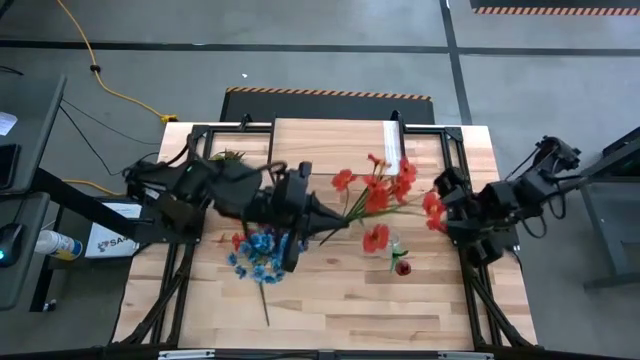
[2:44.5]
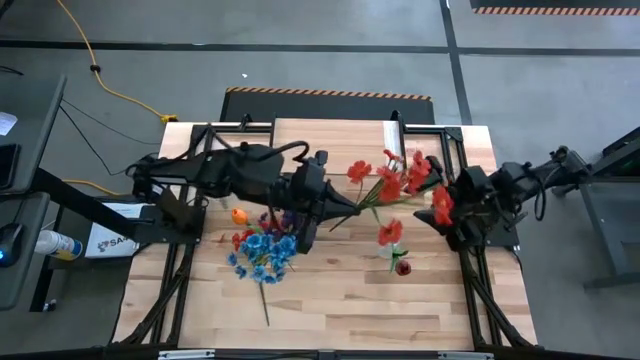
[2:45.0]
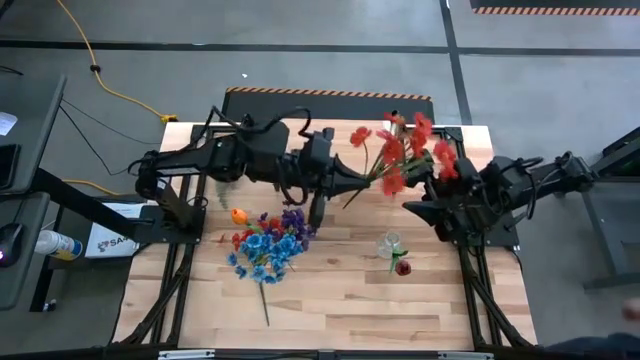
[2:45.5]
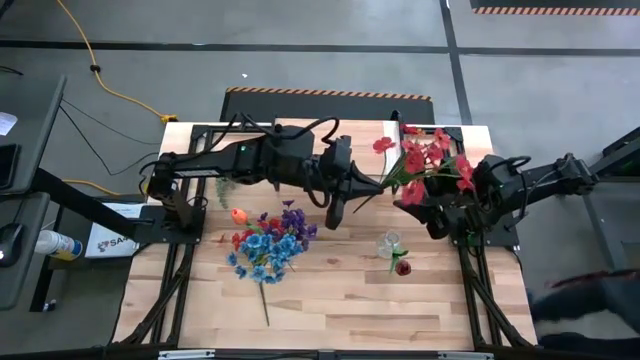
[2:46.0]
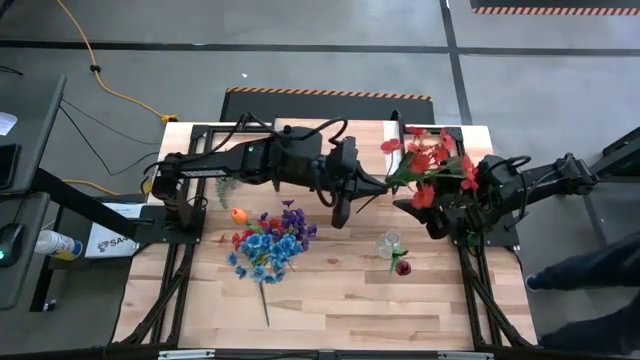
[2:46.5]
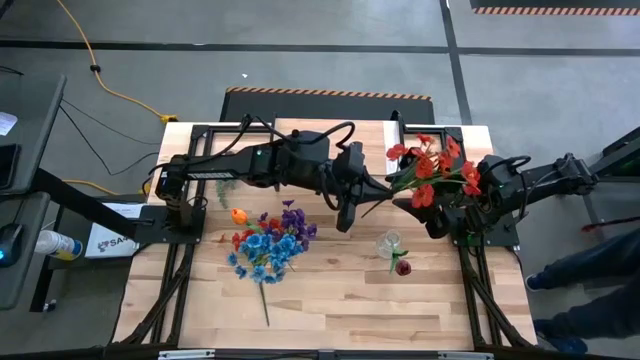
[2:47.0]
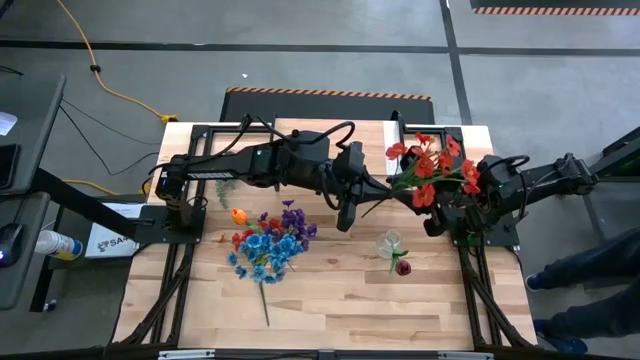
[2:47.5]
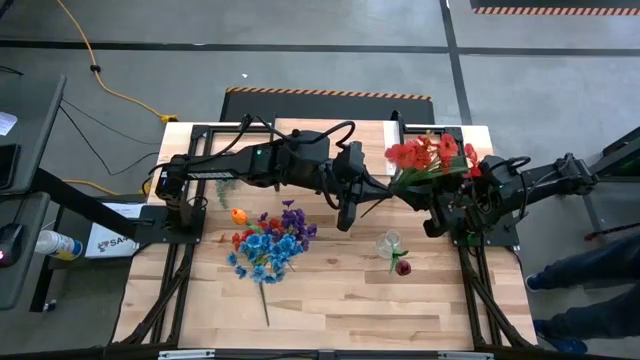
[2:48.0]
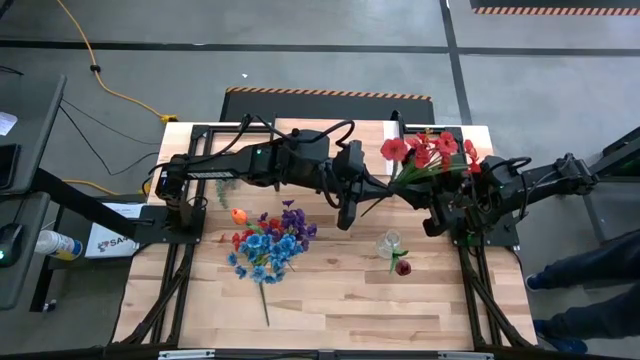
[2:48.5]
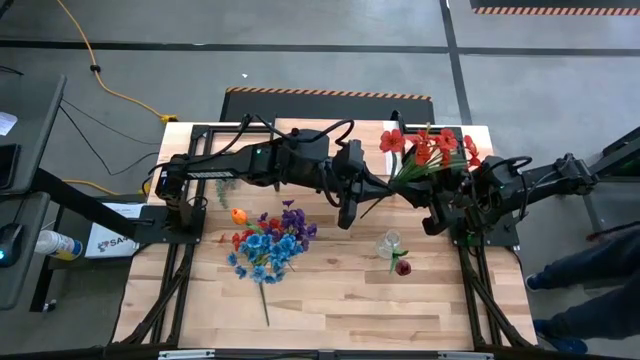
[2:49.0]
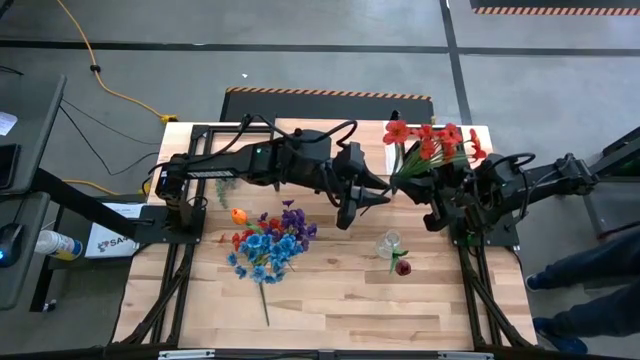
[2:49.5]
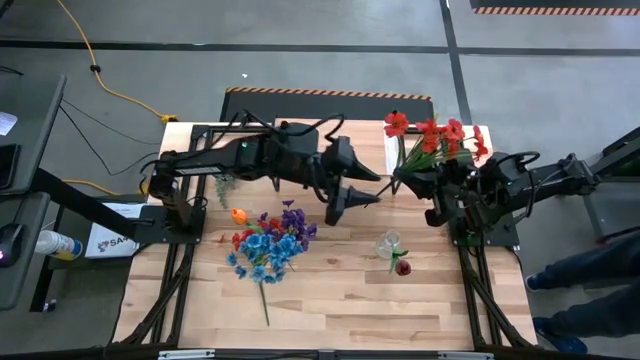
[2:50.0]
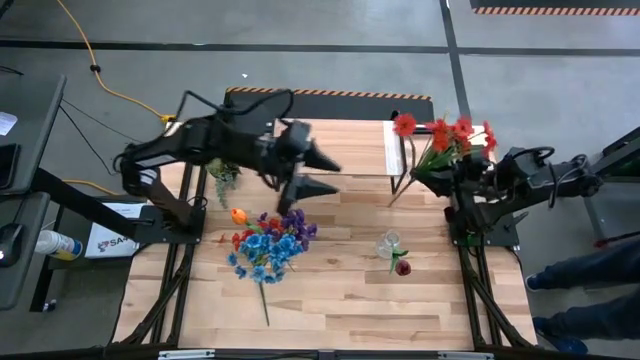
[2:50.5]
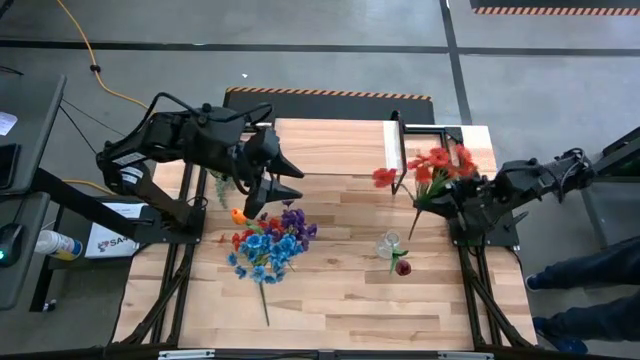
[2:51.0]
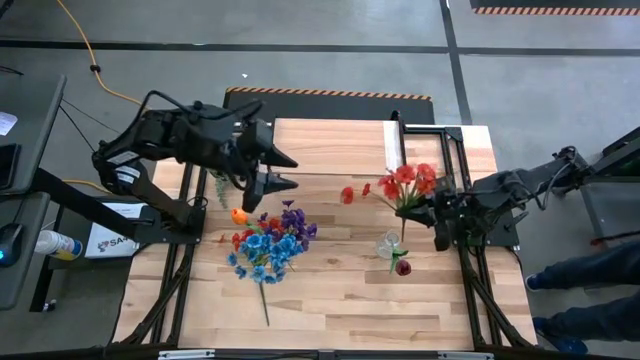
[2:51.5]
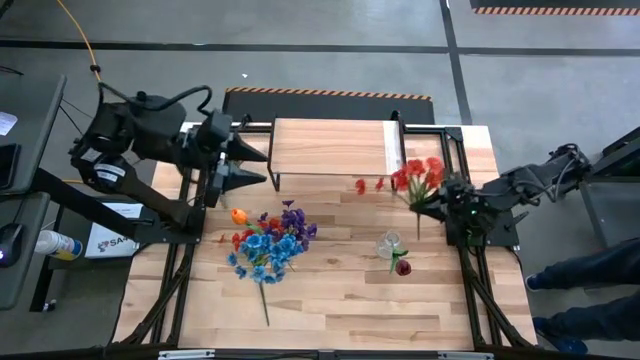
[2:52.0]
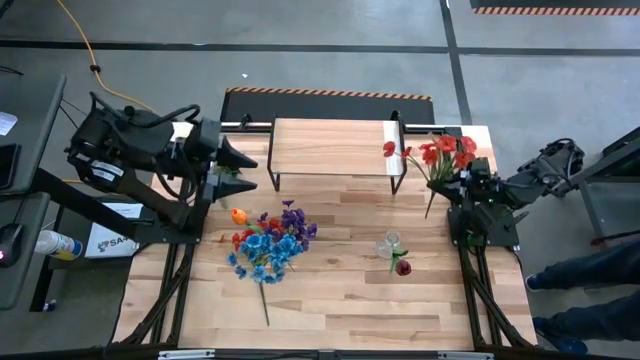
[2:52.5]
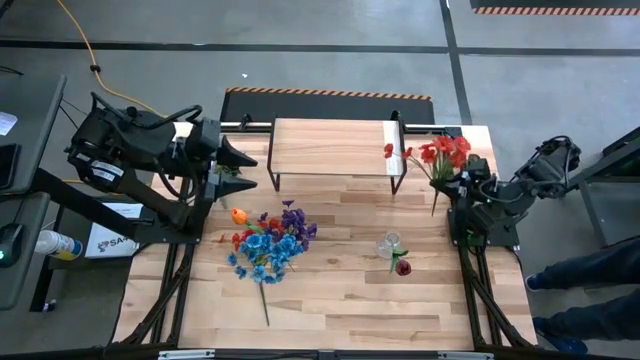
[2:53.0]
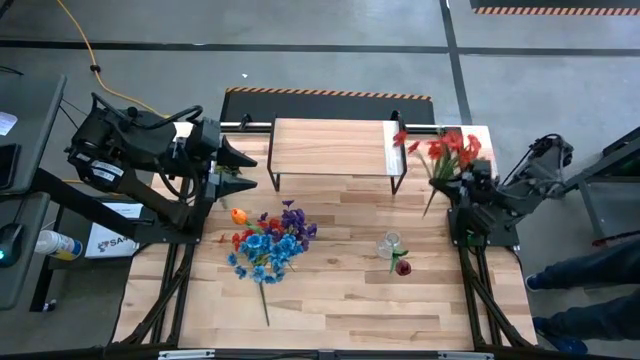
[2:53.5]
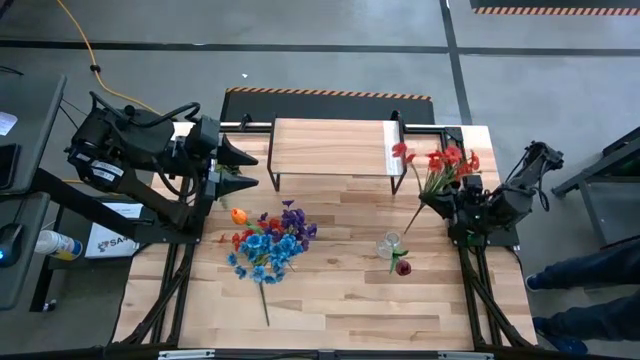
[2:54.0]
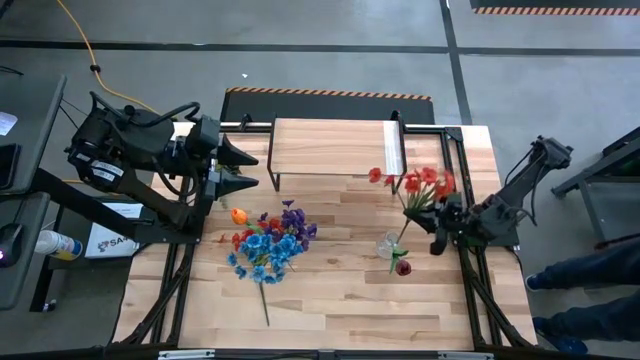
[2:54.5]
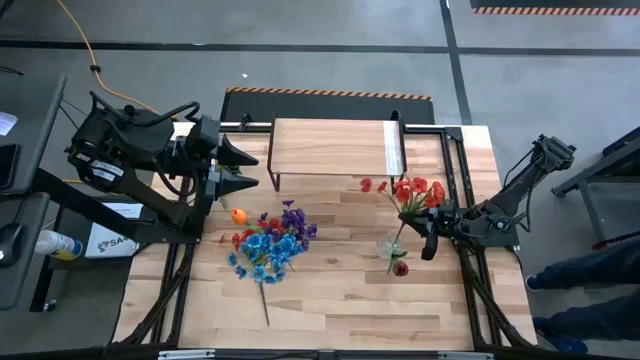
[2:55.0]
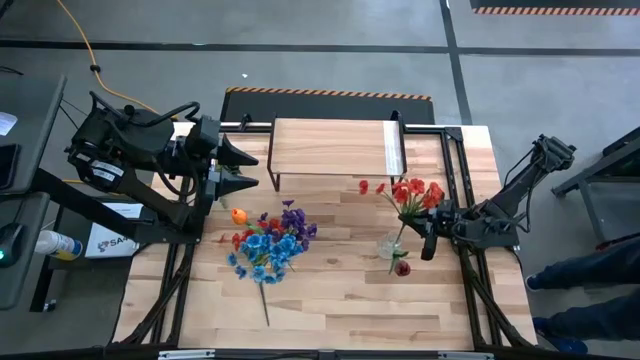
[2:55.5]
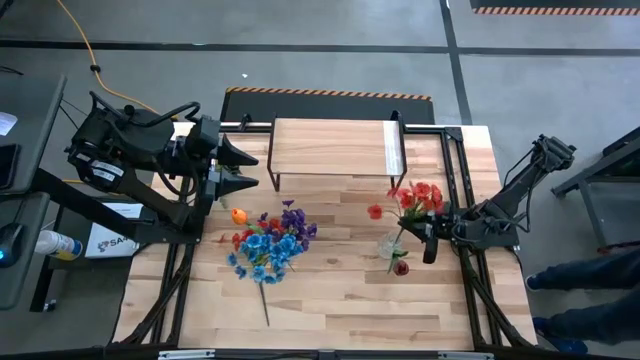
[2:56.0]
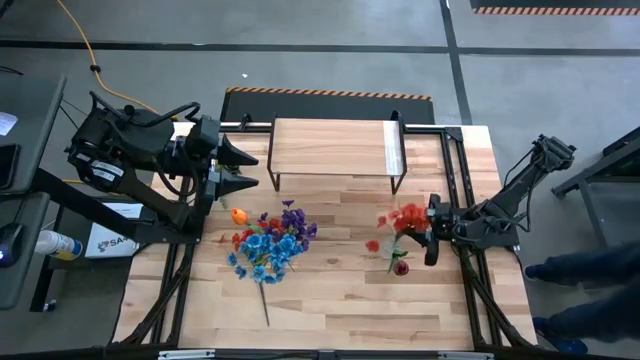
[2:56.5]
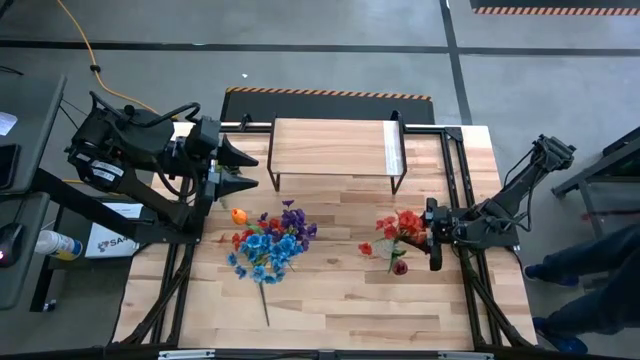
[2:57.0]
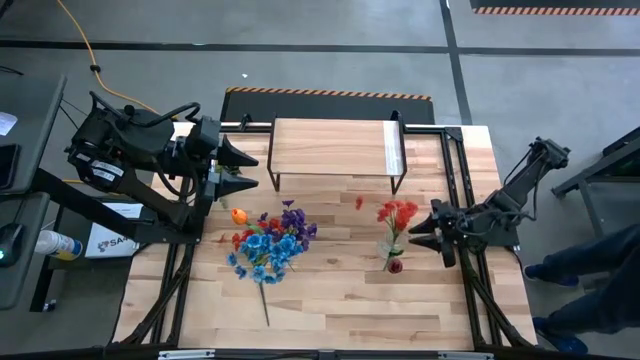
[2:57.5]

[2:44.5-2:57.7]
Task: Pick and place flowers into a vace then onto a shelf
Put the right red flower into the right transparent flower vase

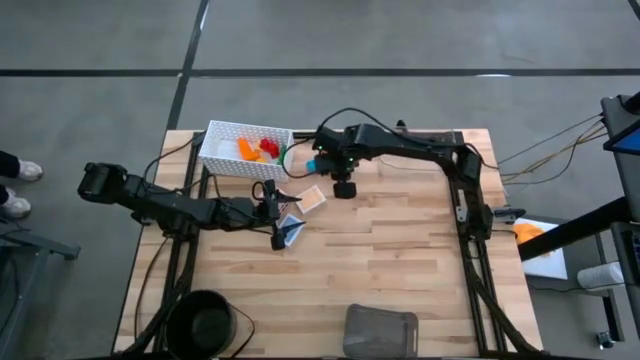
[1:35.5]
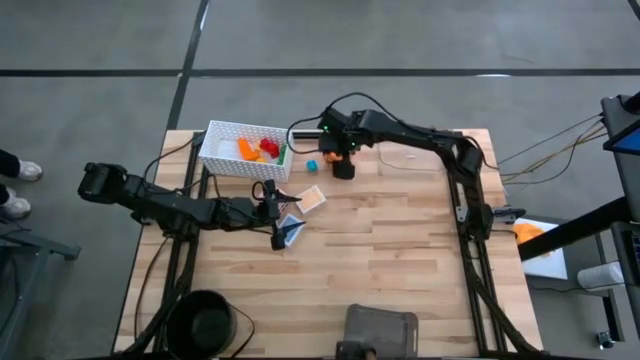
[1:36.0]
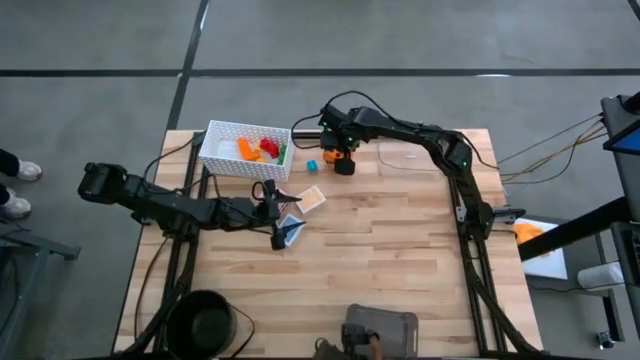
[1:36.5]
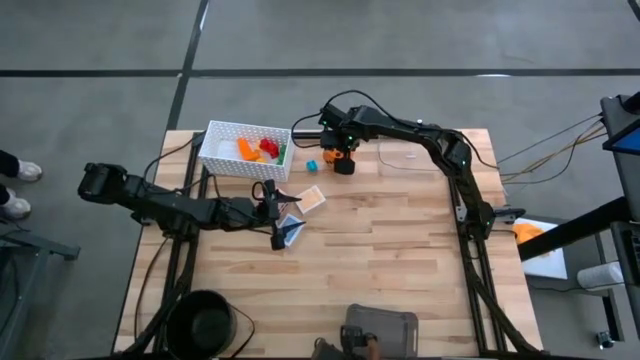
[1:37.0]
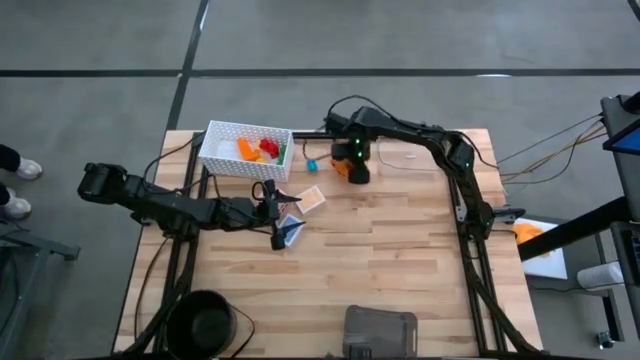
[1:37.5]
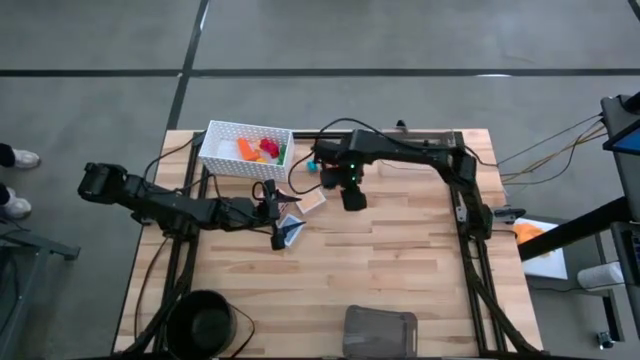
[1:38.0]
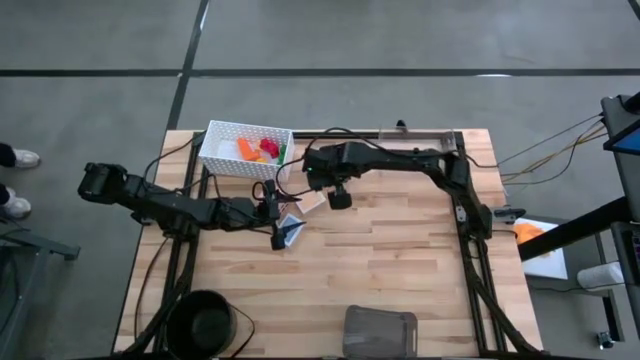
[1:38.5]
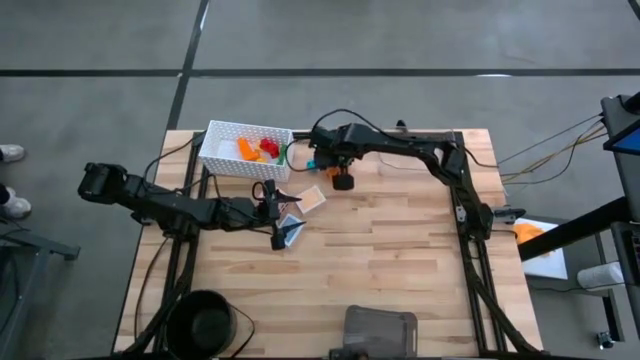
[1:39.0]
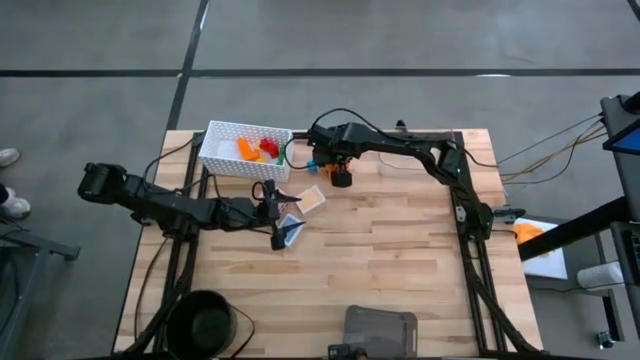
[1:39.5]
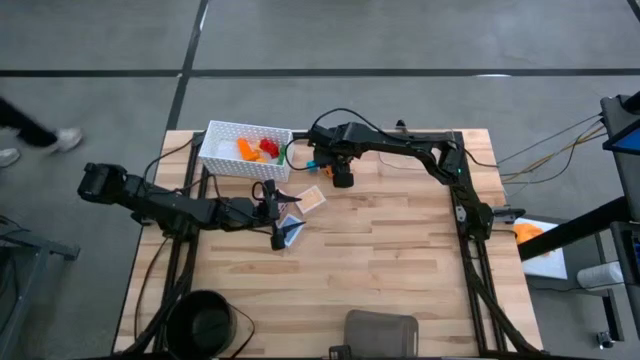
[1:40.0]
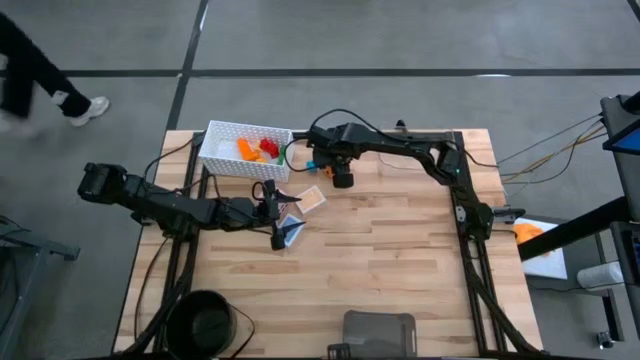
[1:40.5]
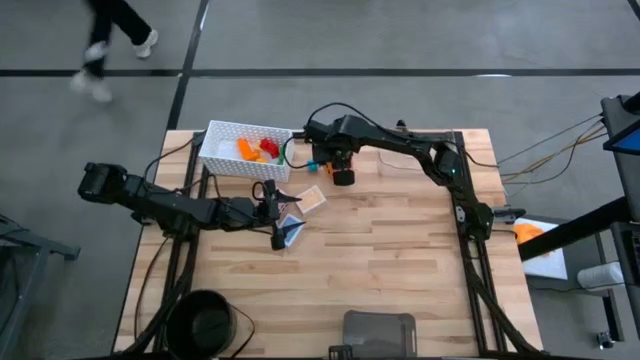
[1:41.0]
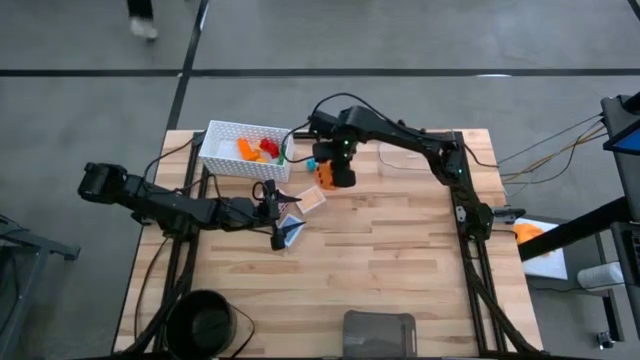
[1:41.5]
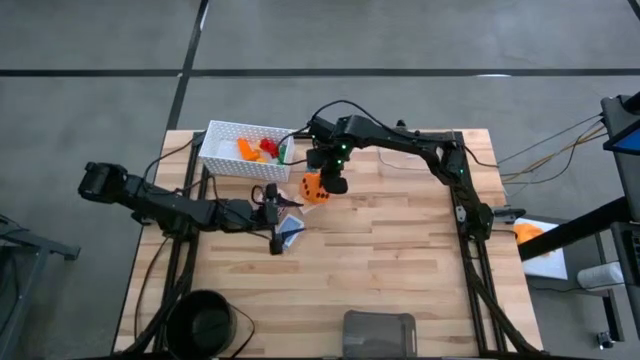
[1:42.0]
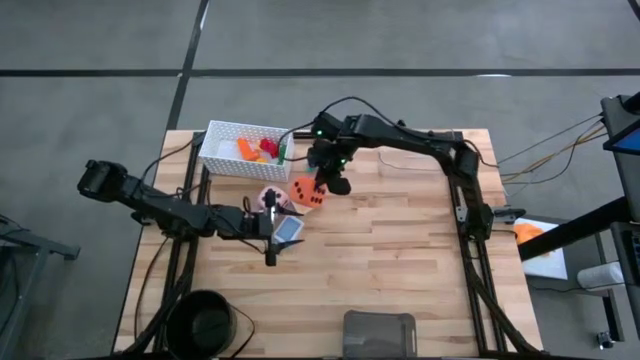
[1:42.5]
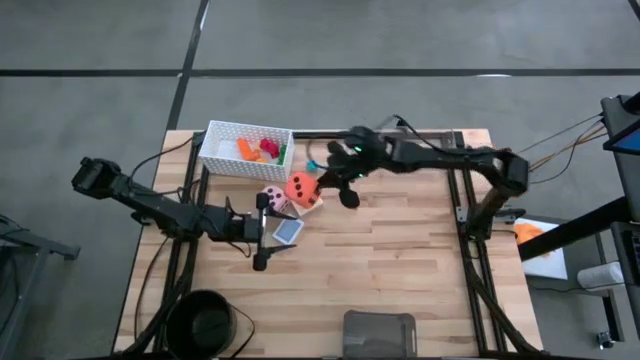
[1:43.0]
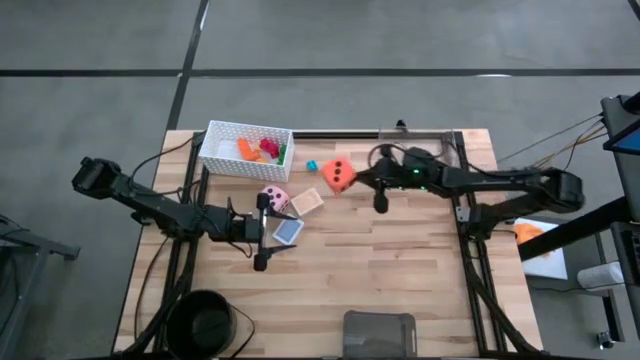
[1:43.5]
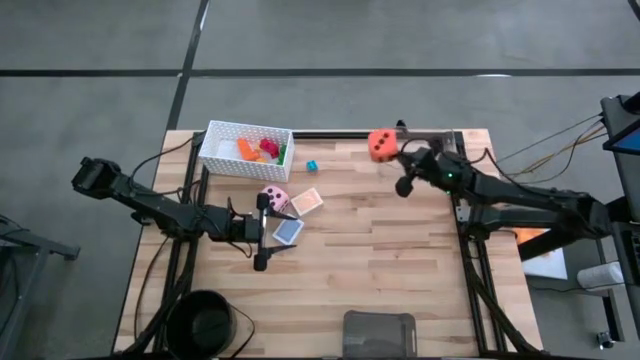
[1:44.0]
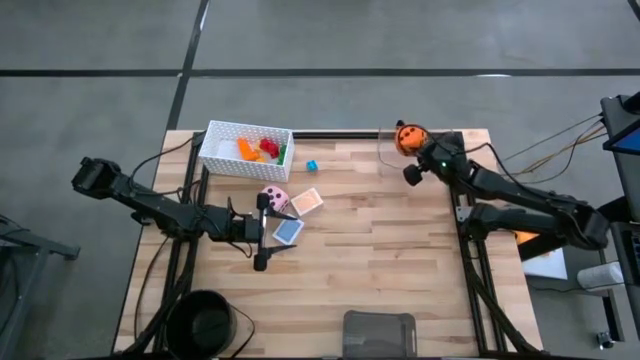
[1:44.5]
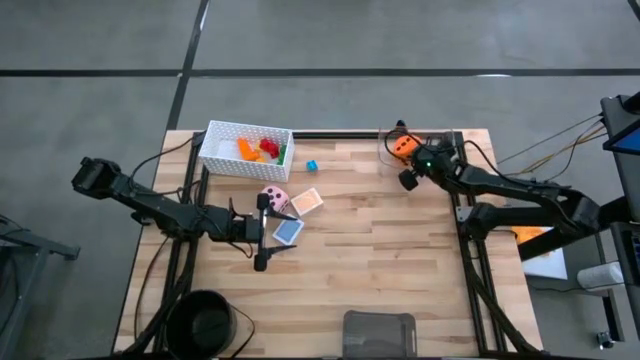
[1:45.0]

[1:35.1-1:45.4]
Task: Pick & Place Toys
Put the orange dice into the transparent bin
